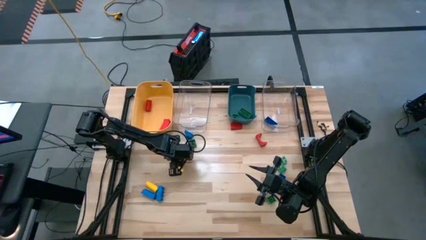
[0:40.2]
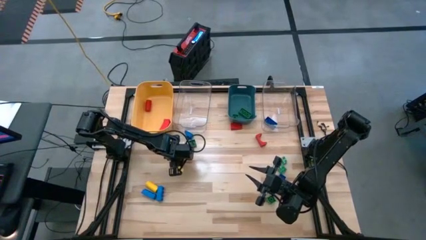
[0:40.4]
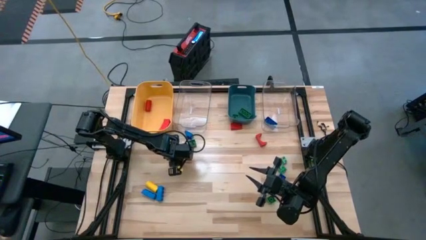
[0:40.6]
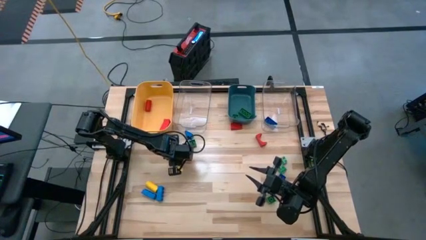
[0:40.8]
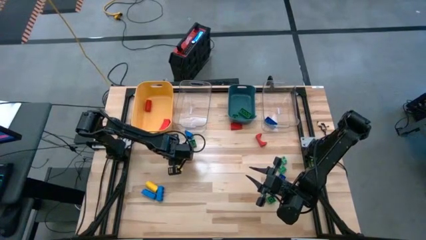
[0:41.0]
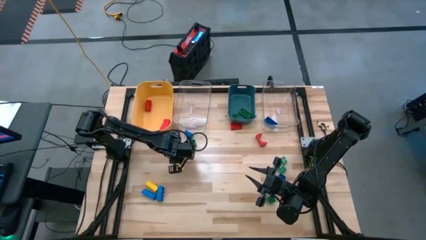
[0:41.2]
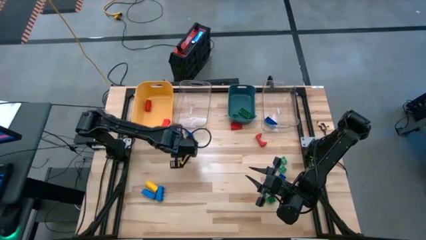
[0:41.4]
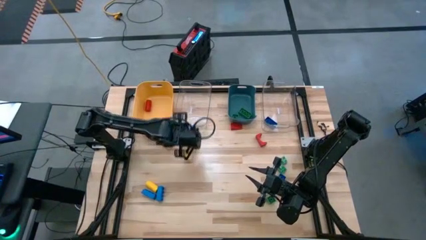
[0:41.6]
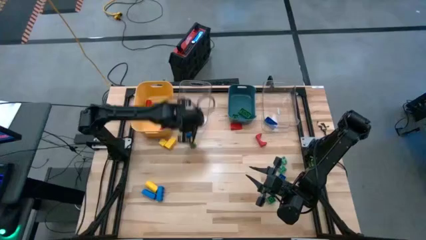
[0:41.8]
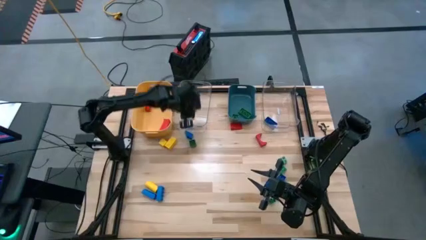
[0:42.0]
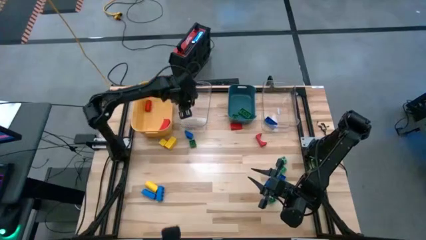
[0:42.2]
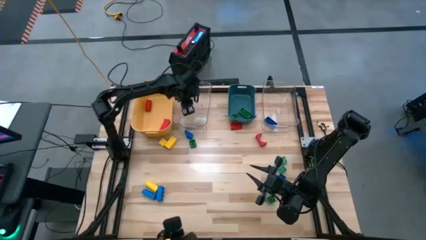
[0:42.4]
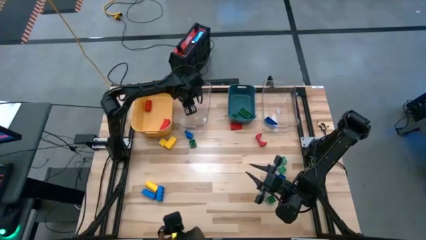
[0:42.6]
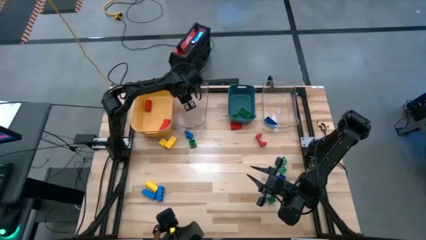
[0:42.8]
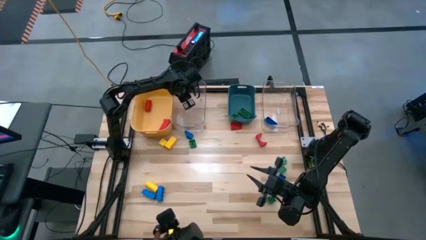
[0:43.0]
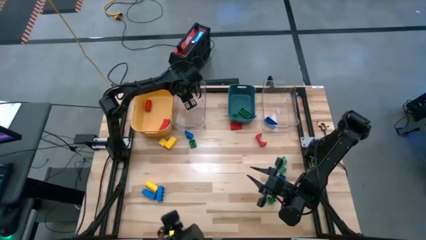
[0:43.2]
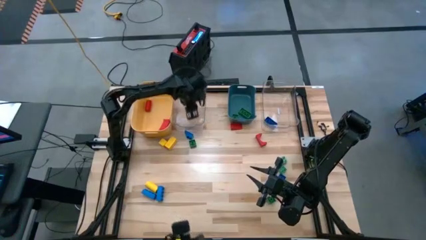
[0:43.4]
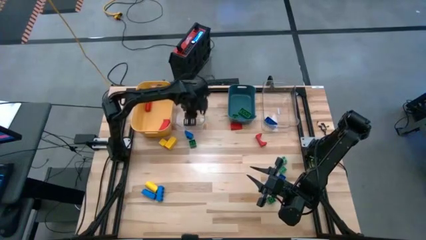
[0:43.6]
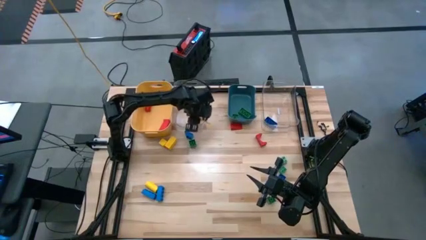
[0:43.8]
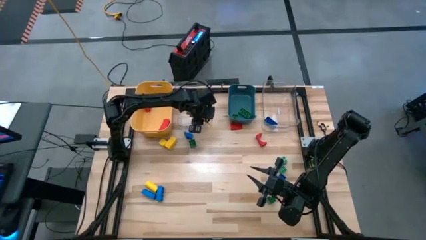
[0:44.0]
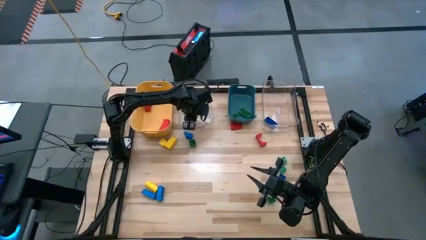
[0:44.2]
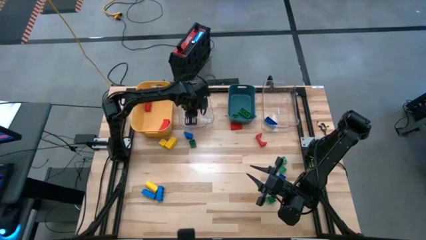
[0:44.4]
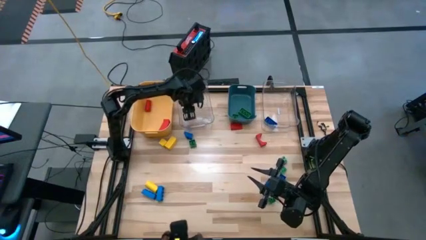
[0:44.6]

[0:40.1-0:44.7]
Task: Sort blocks
Put the yellow block into the left transparent bin

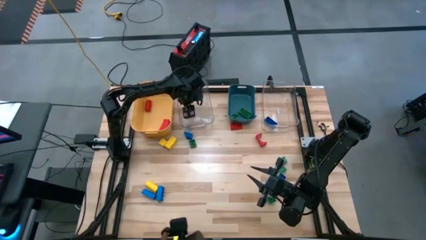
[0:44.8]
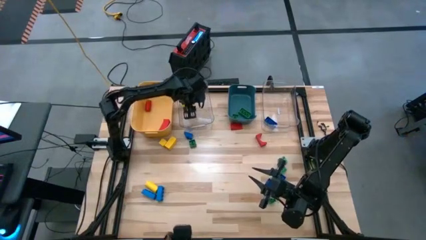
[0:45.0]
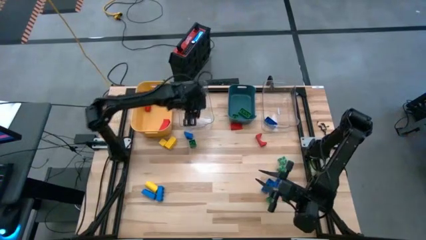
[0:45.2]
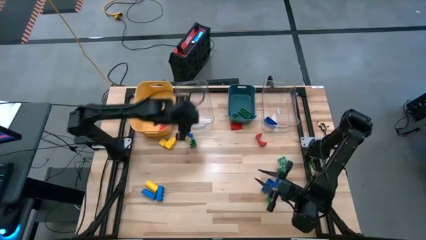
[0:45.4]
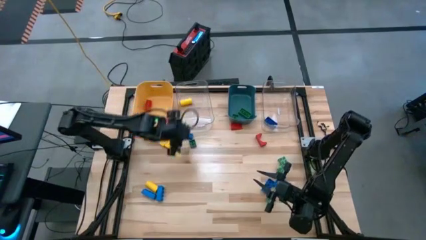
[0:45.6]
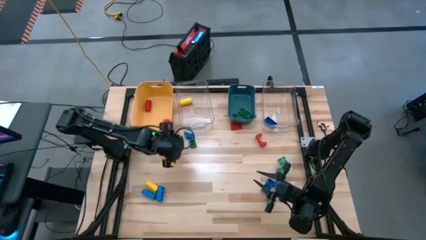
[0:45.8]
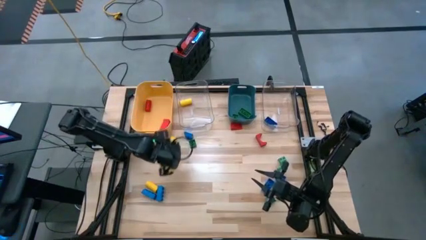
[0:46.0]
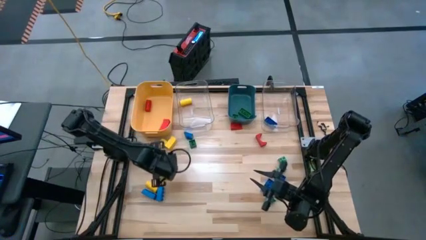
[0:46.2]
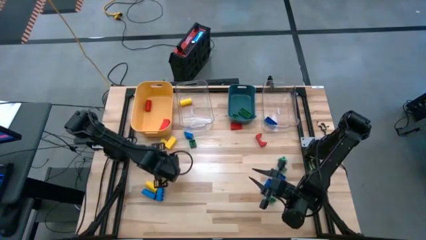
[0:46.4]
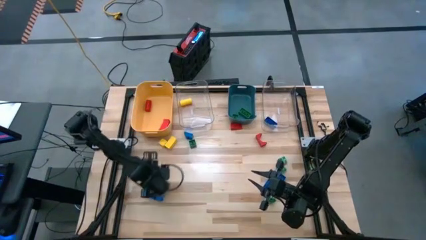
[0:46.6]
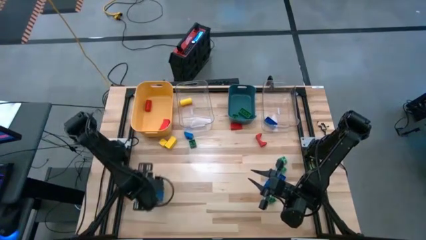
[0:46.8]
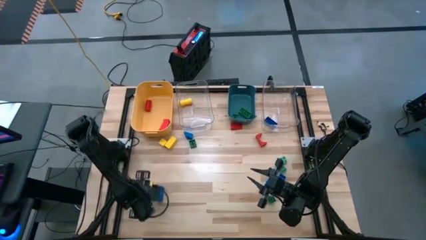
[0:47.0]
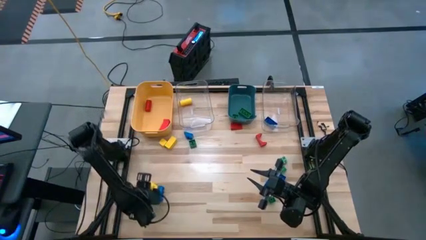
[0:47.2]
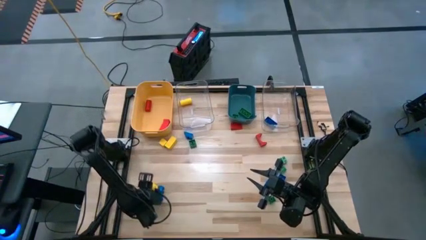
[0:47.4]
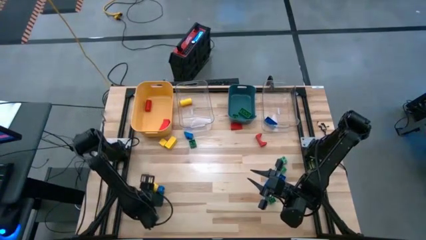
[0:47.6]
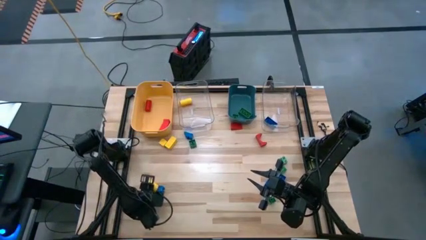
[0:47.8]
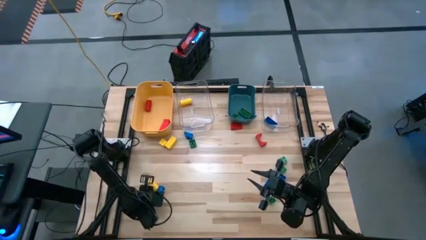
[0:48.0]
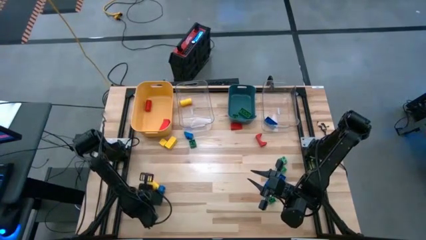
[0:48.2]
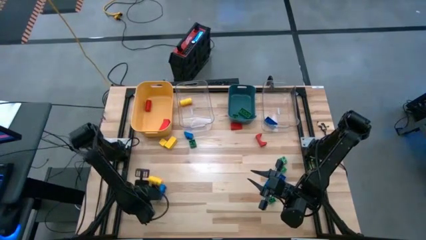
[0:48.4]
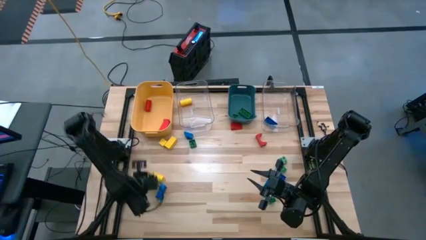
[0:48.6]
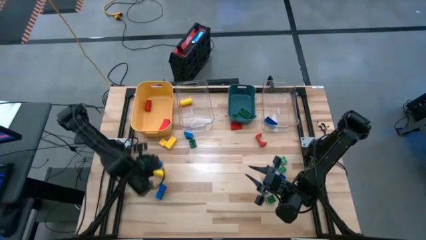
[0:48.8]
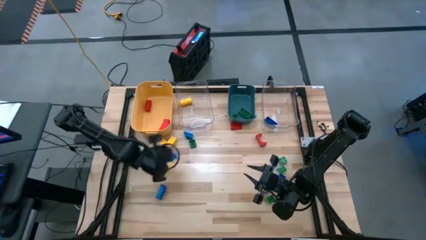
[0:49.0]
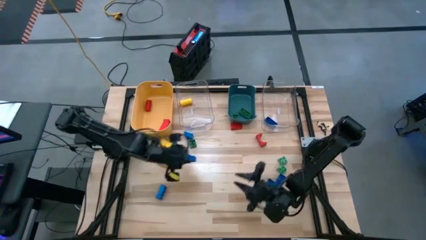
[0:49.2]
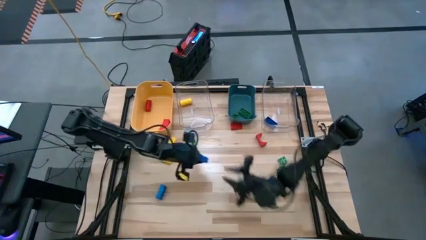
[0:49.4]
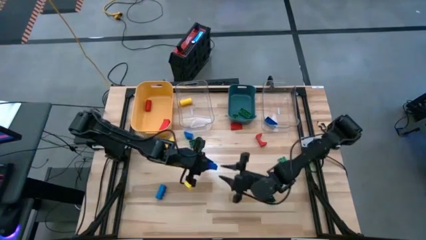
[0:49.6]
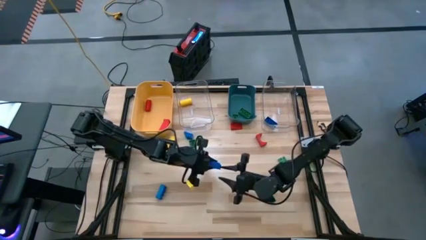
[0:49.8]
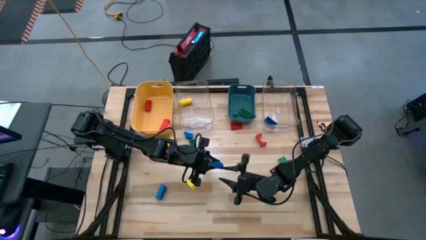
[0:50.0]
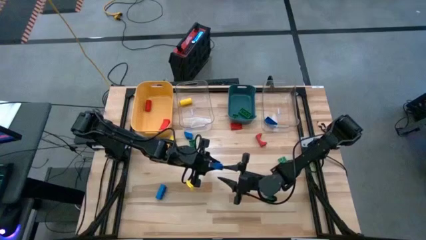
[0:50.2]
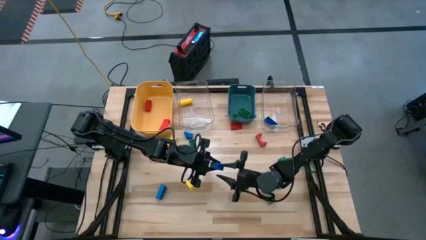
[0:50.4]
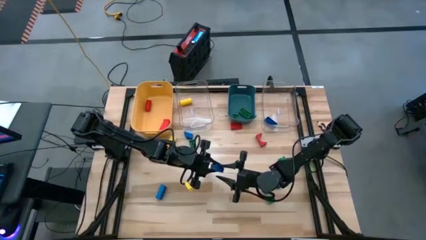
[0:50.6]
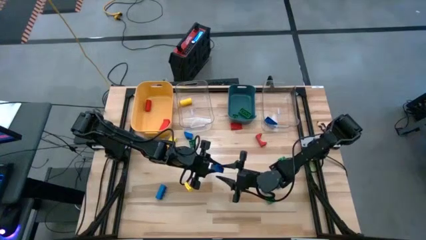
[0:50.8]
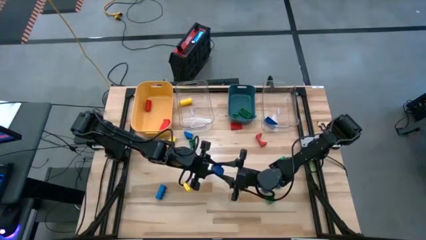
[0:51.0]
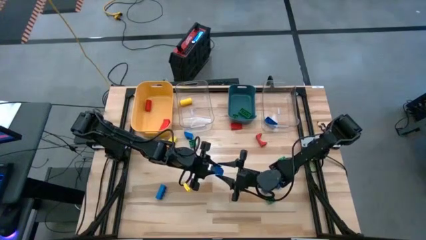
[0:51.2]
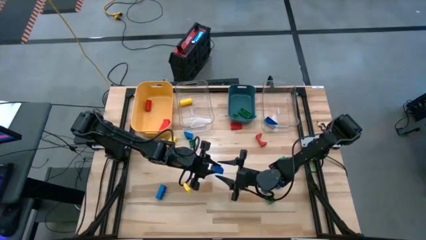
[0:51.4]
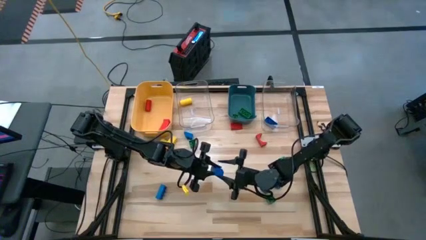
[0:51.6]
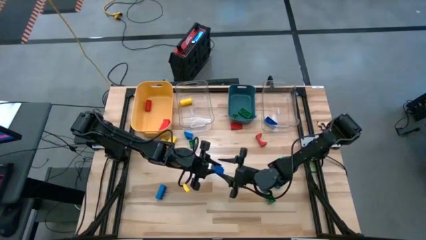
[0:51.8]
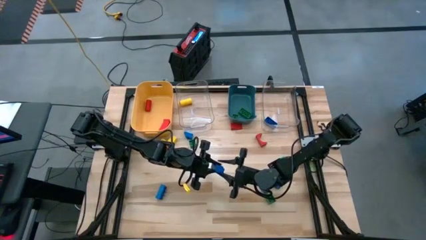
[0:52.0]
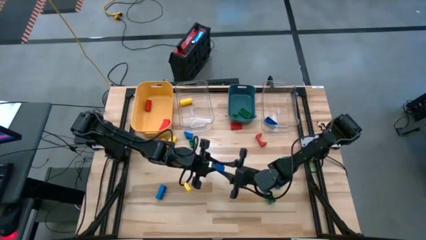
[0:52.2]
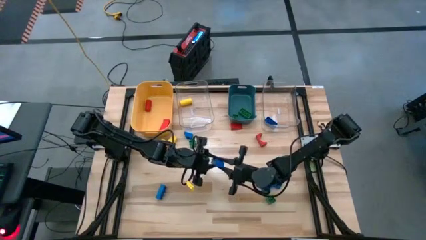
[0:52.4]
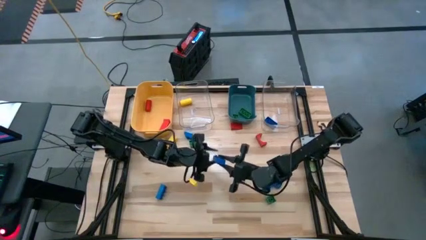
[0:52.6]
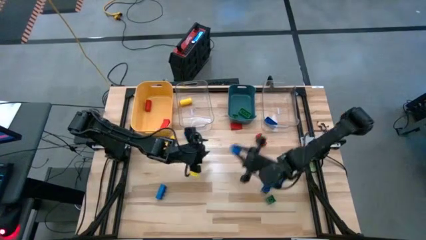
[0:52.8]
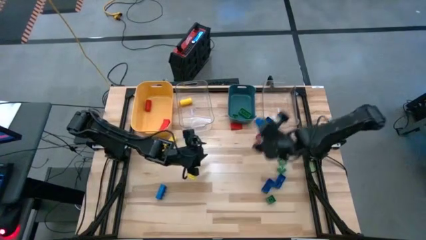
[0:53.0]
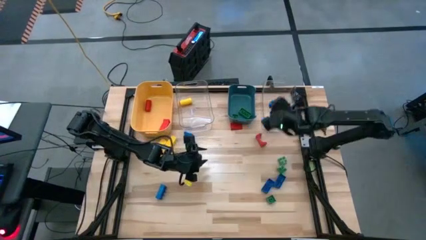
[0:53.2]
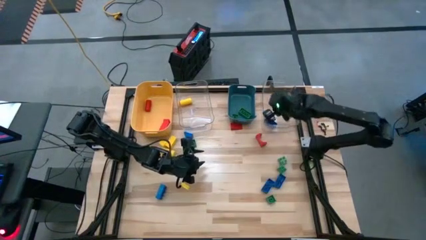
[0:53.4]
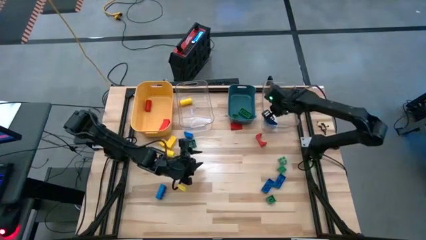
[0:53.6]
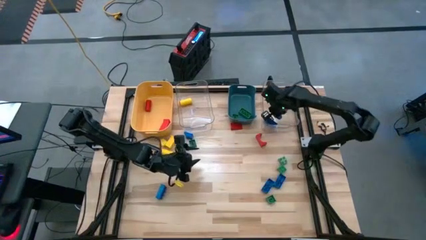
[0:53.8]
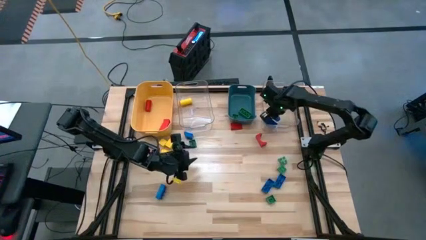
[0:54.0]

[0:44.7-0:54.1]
Put the blue game piece into the right transparent bin

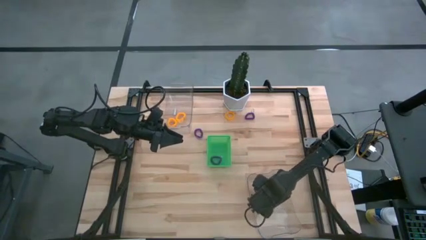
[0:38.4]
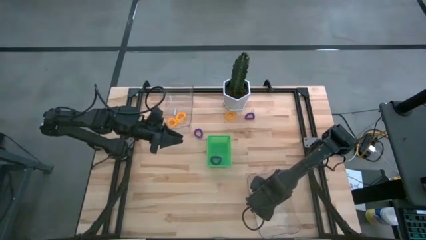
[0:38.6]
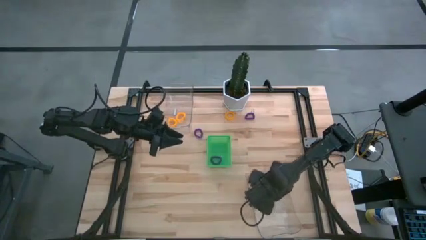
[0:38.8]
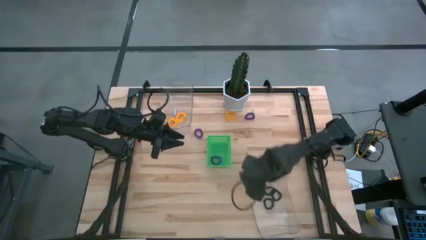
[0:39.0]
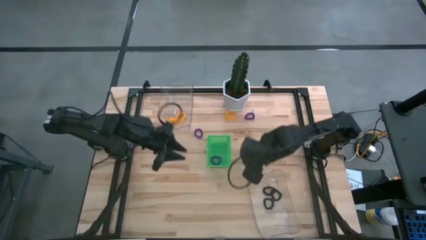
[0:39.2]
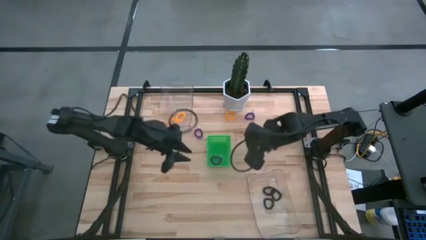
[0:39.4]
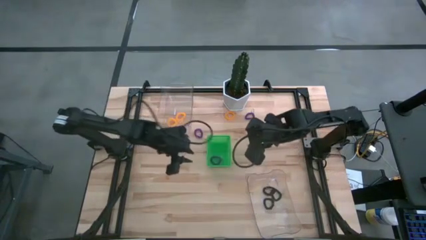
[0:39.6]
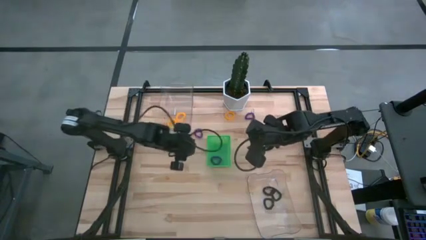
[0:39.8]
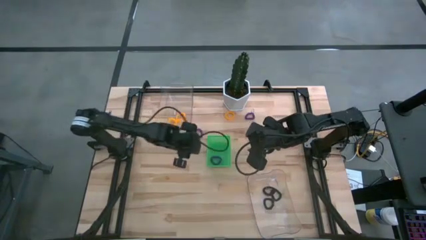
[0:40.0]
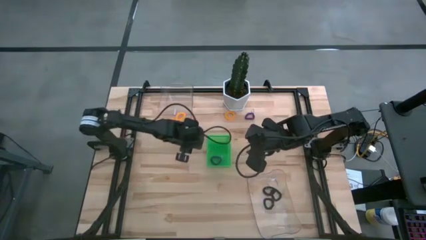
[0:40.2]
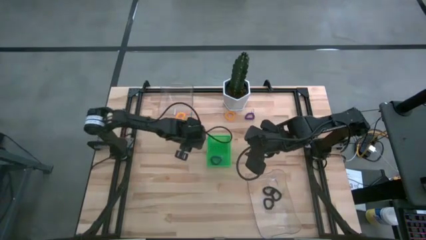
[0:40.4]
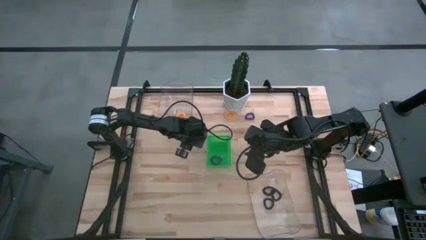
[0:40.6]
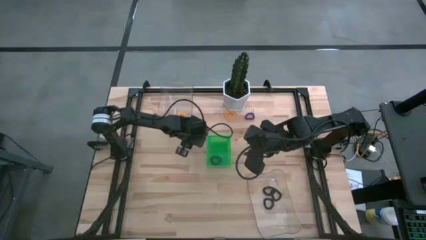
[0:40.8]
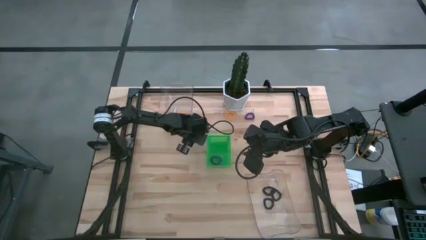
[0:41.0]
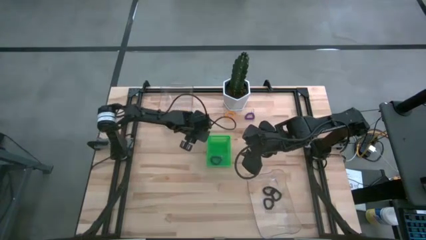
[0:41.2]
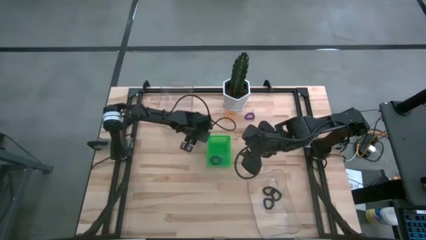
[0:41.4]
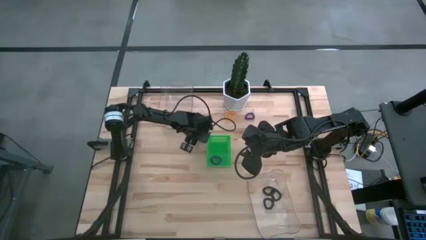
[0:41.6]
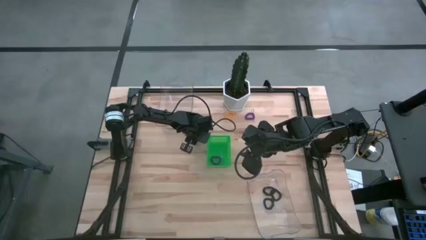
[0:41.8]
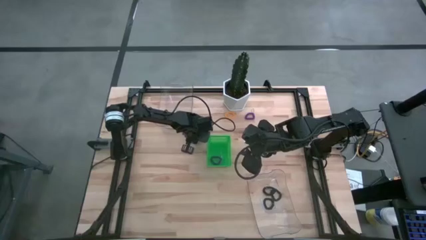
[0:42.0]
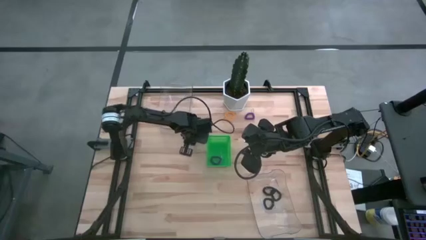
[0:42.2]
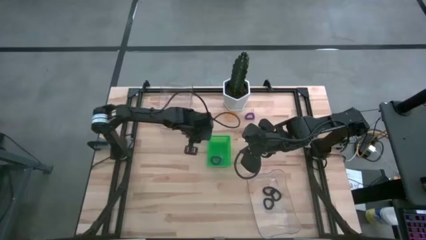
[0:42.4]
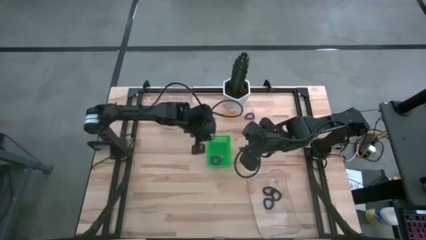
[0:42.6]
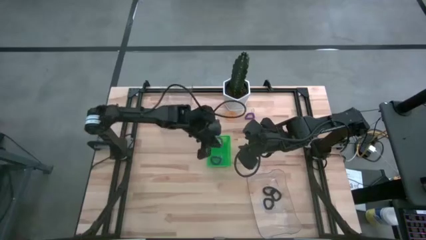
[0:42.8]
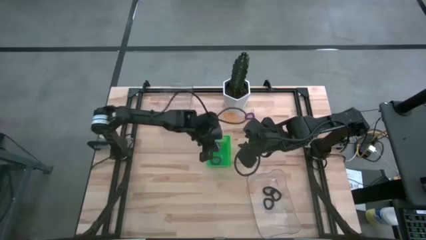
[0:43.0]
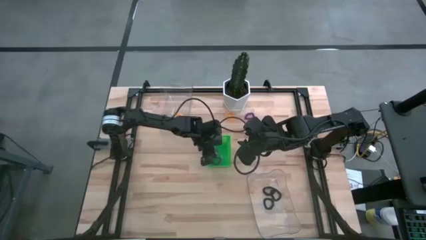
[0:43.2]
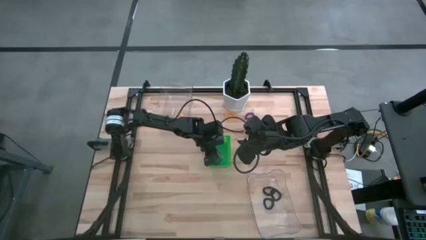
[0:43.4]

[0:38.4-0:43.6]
Task: Sort spring keychains
Put the left purple spring keychain into the green bin
